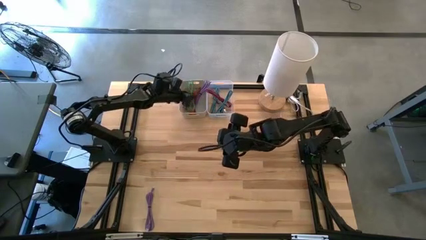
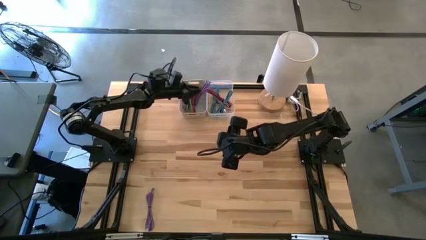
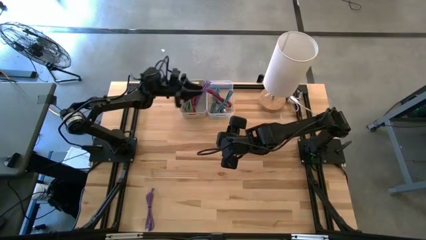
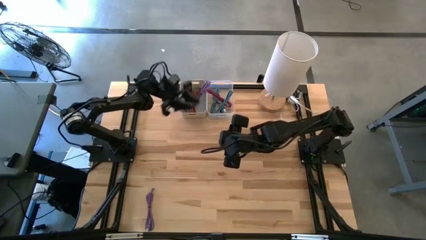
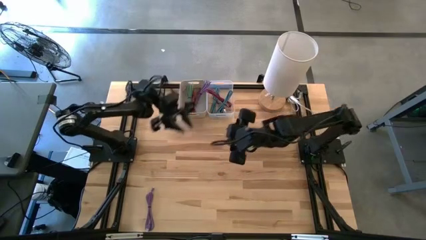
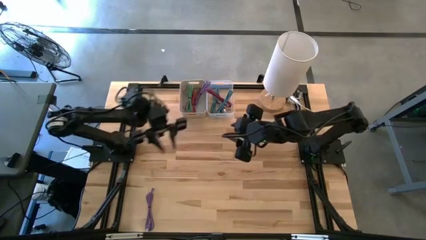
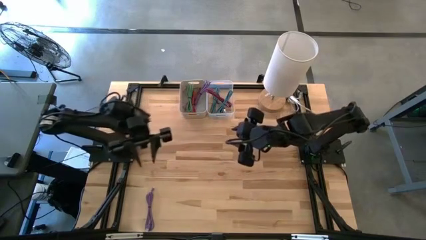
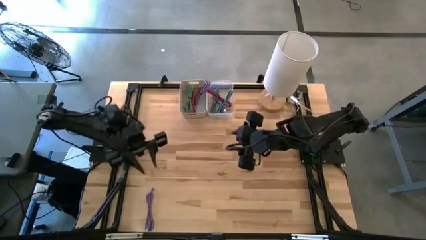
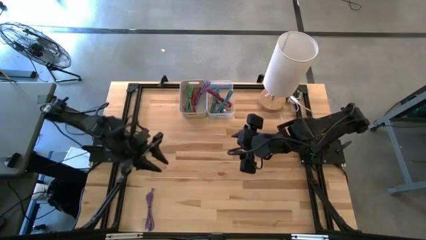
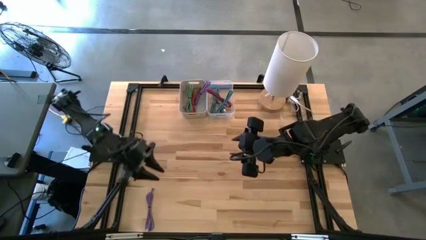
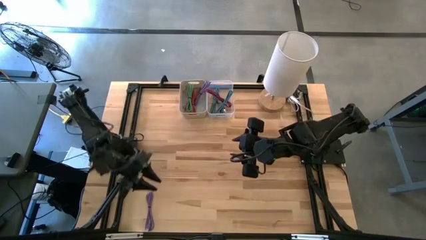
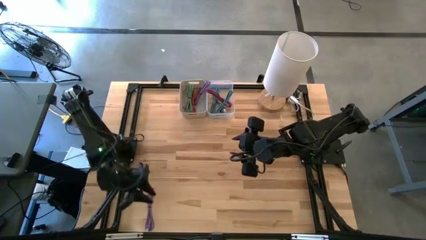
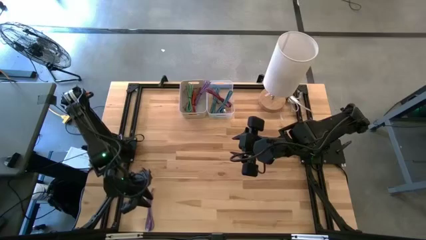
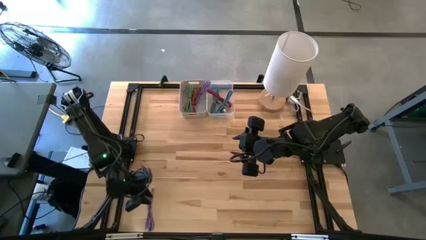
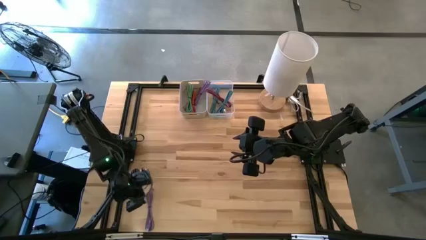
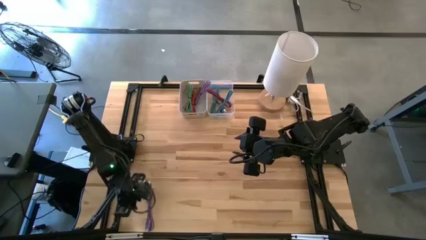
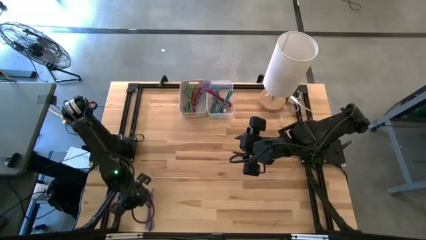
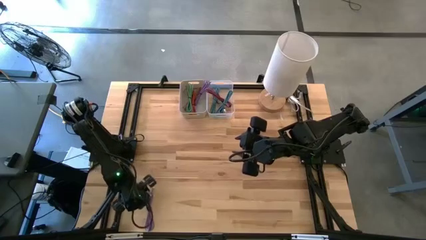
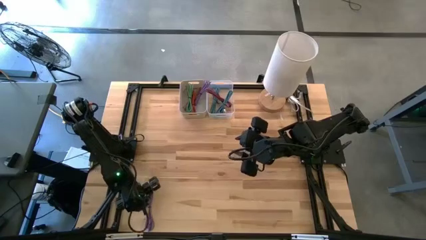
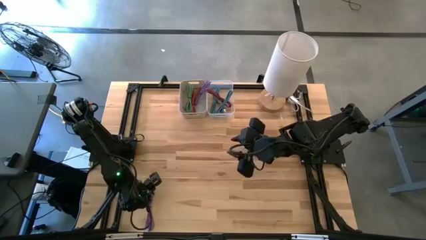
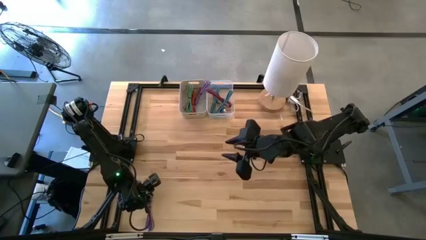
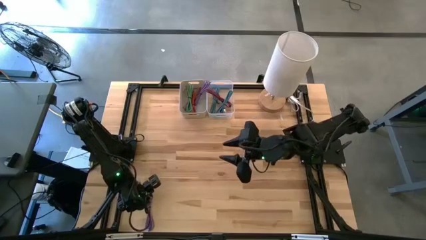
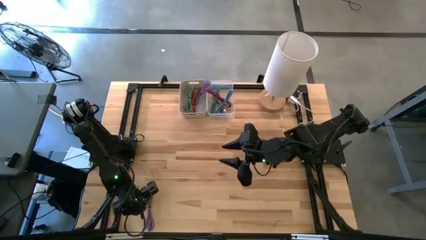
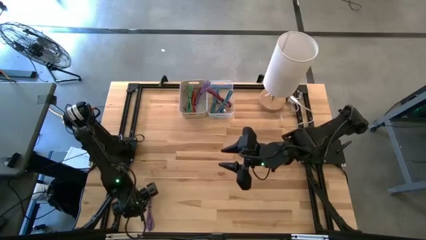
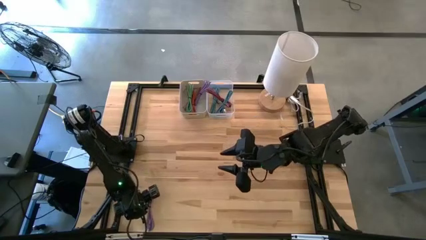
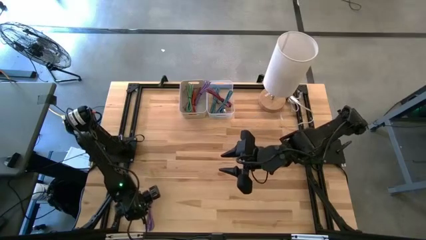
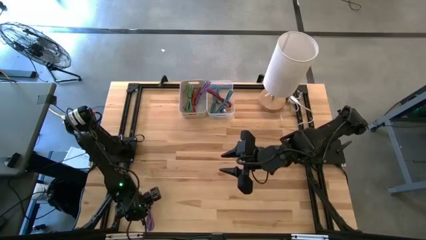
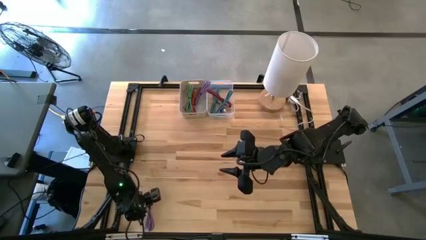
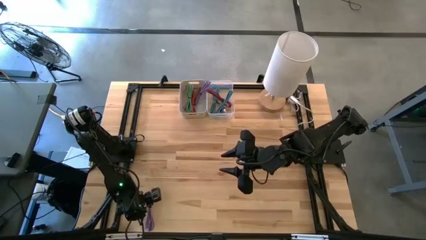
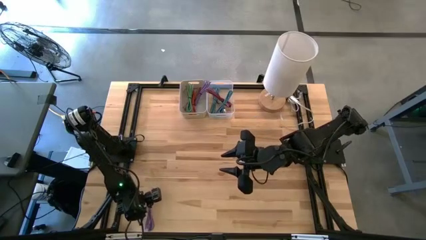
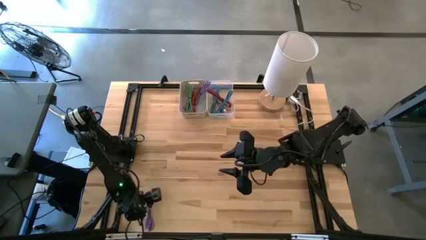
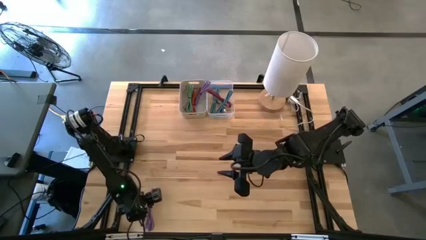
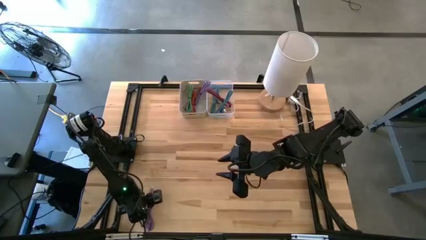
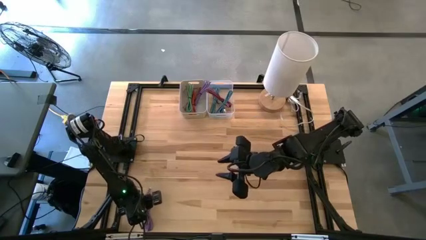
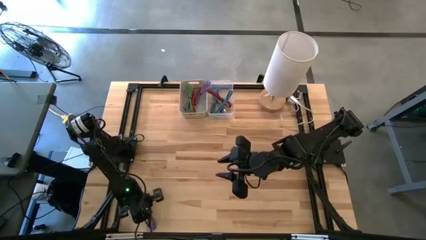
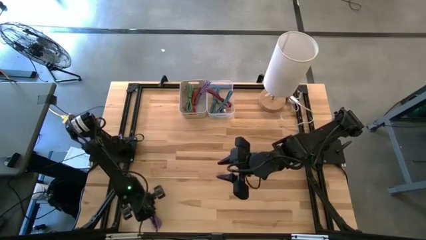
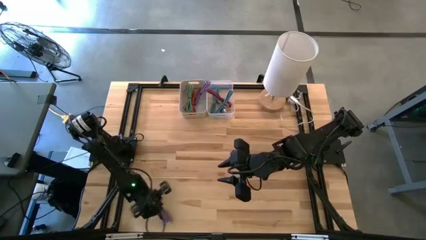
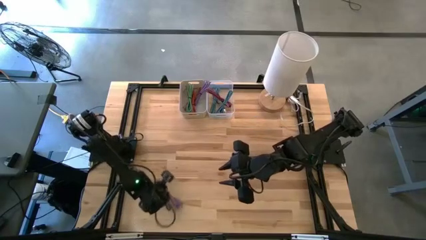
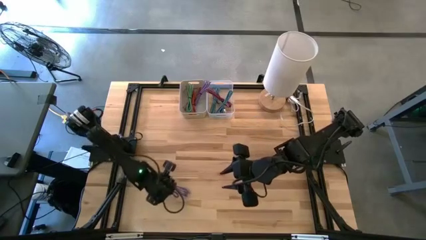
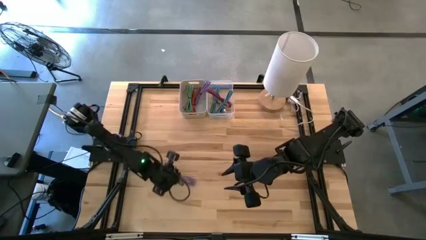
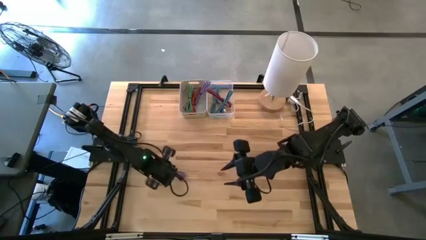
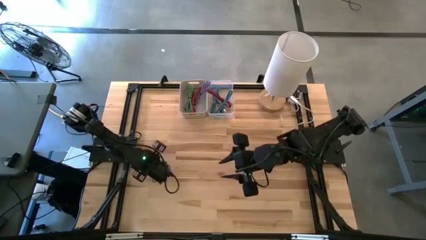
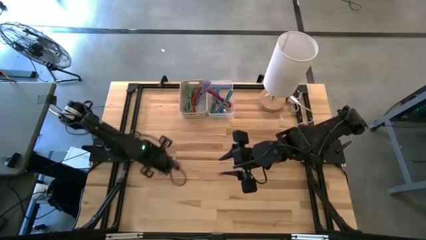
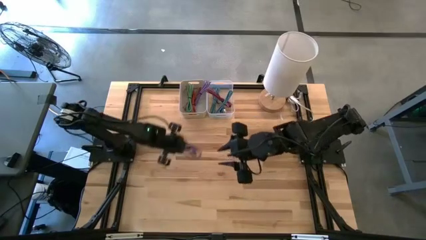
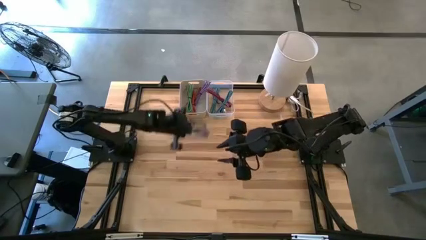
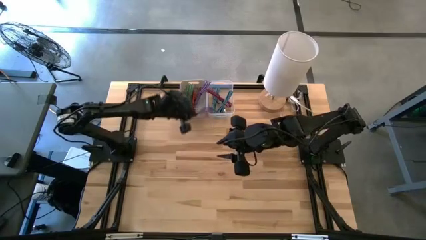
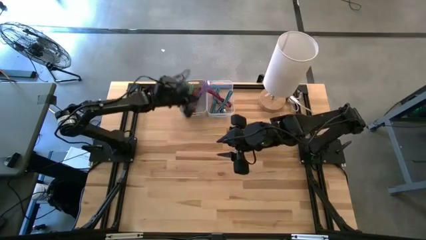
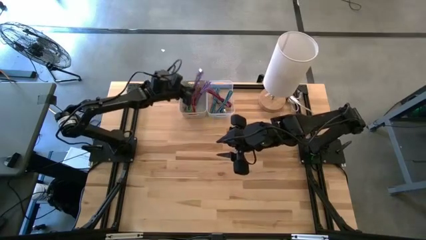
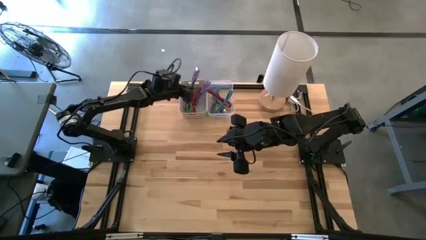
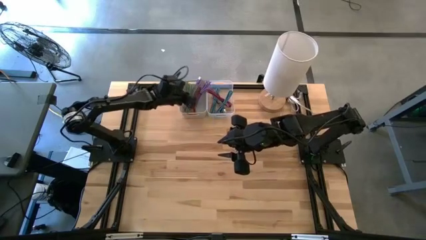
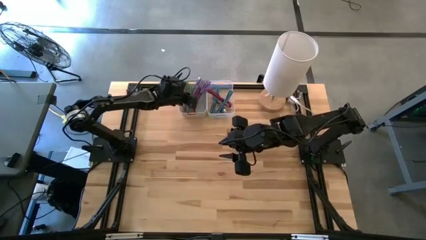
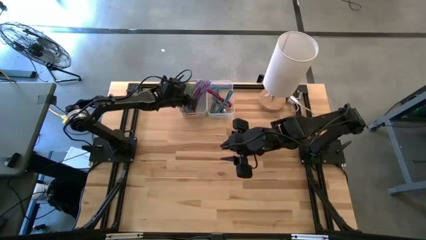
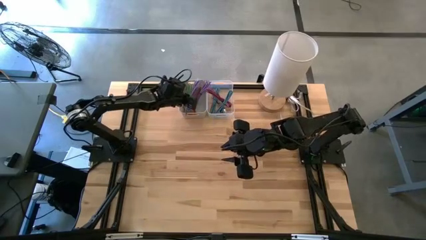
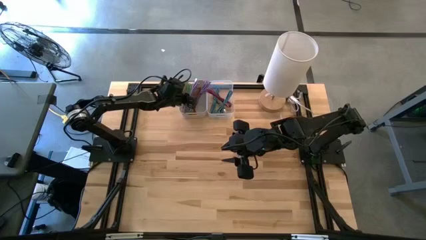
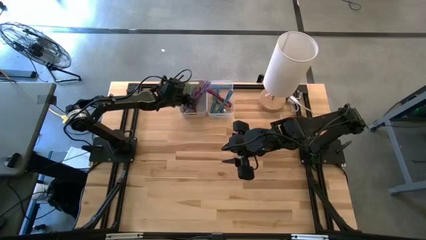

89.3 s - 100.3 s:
Task: Pick & Place USB Port
Put the violet USB cable into the gray bin

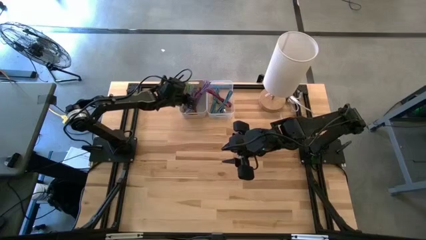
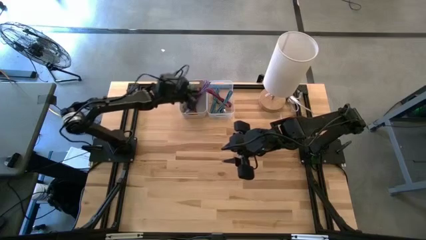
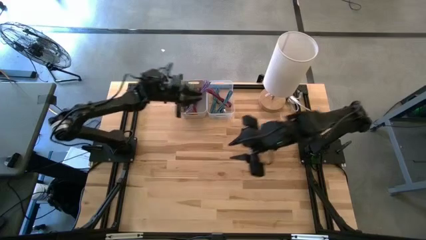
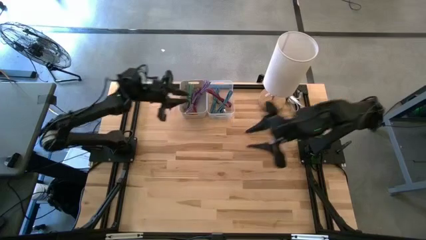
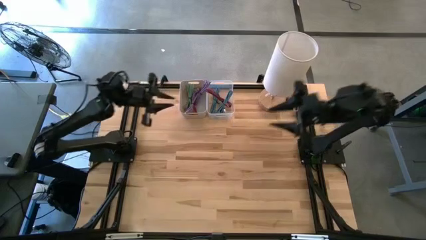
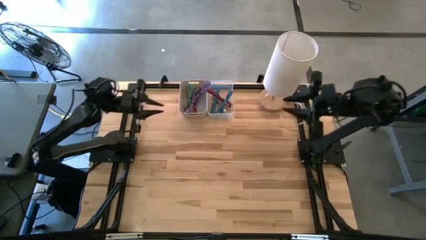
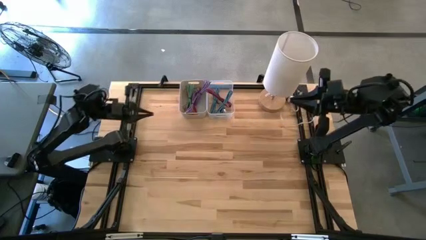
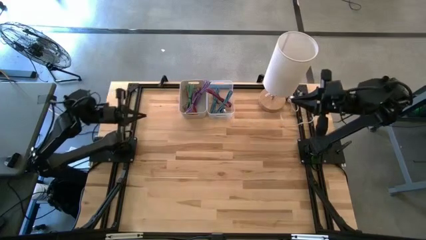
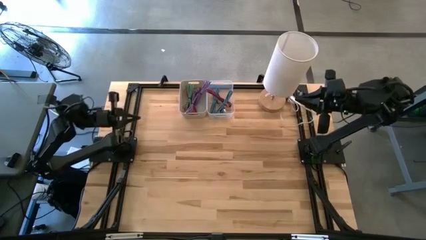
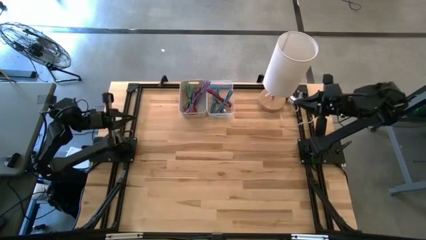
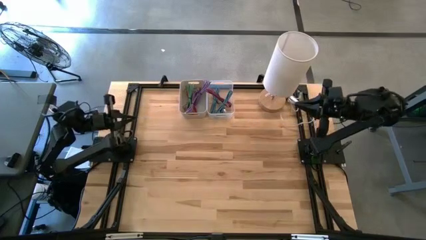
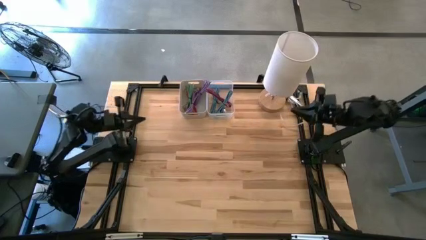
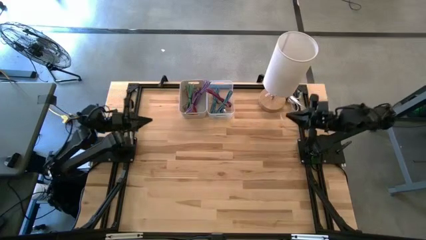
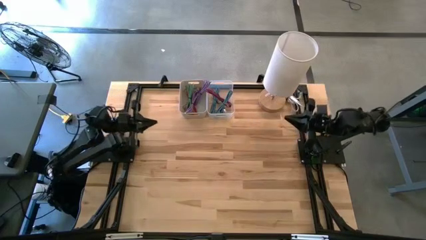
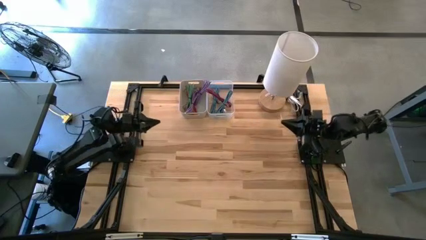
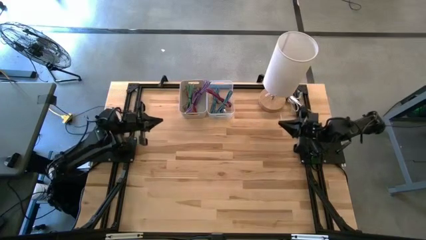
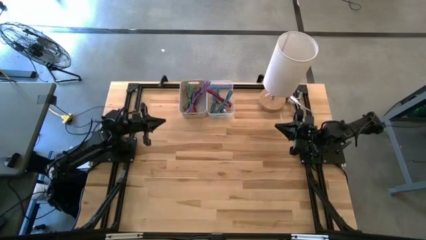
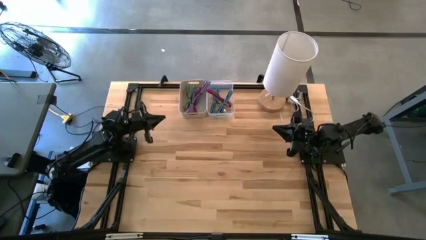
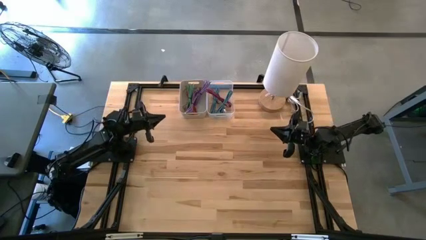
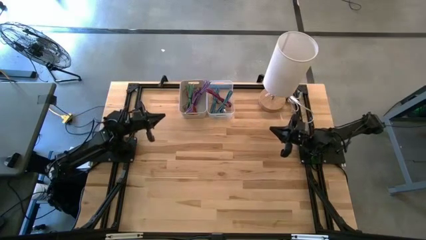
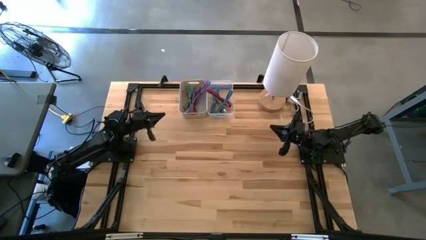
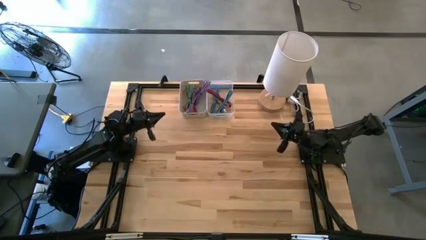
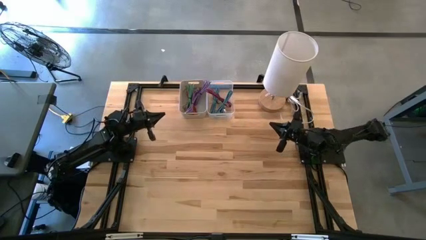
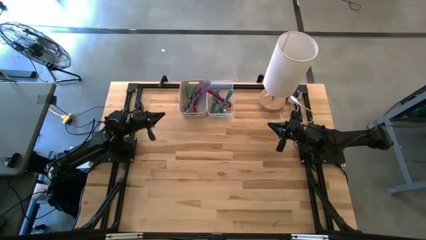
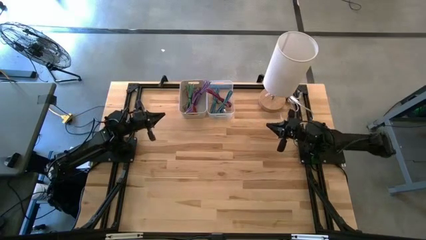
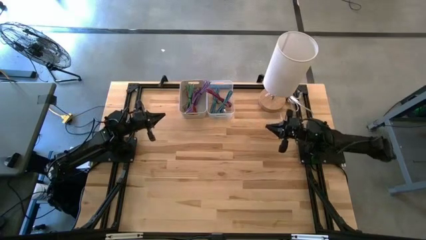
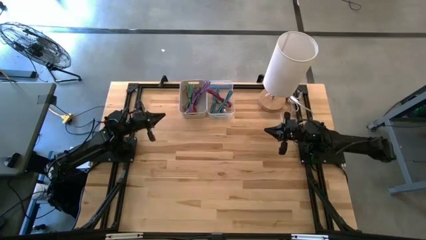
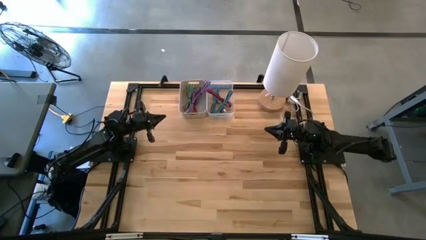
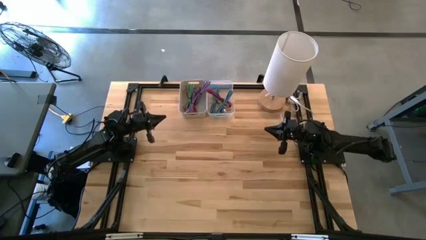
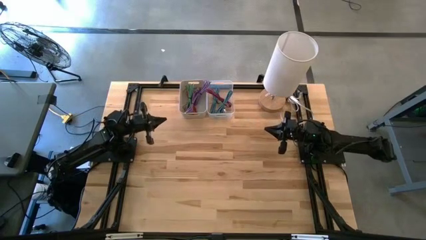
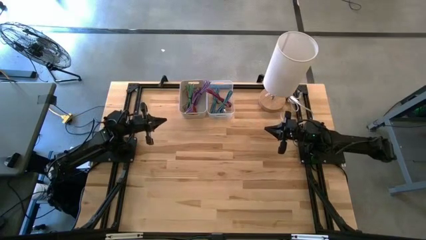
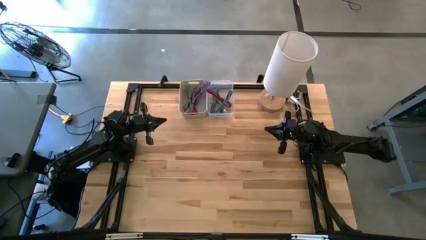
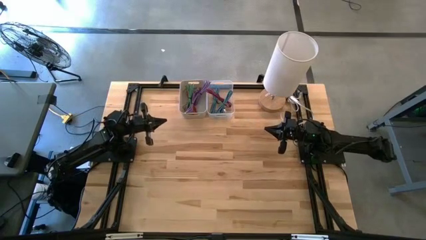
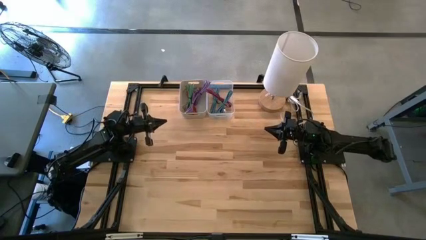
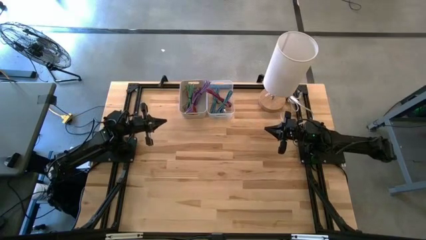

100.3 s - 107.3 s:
Return to home position
